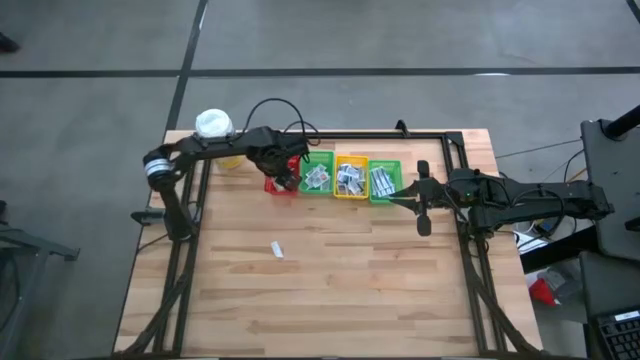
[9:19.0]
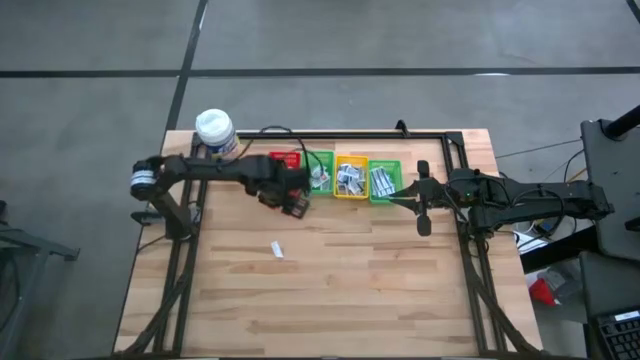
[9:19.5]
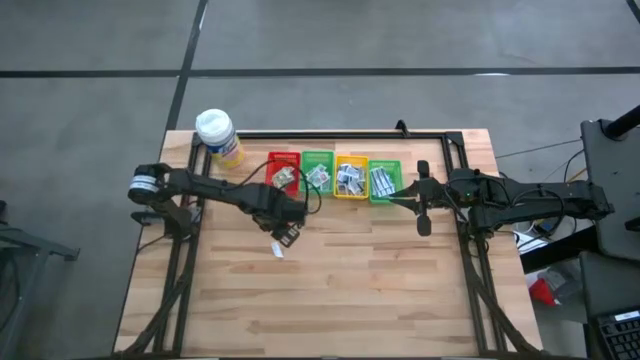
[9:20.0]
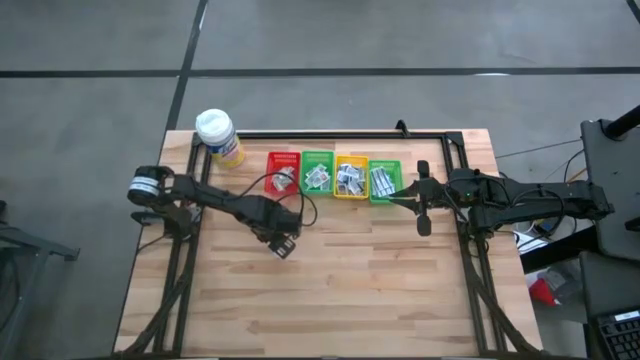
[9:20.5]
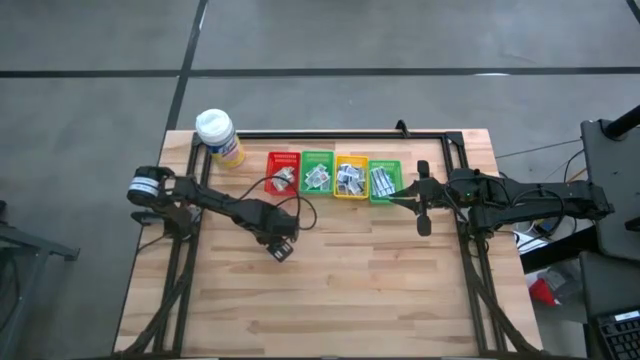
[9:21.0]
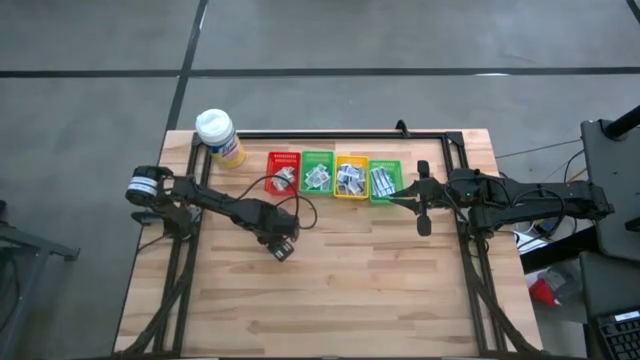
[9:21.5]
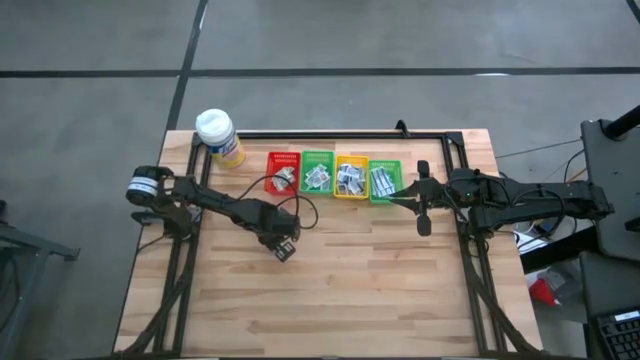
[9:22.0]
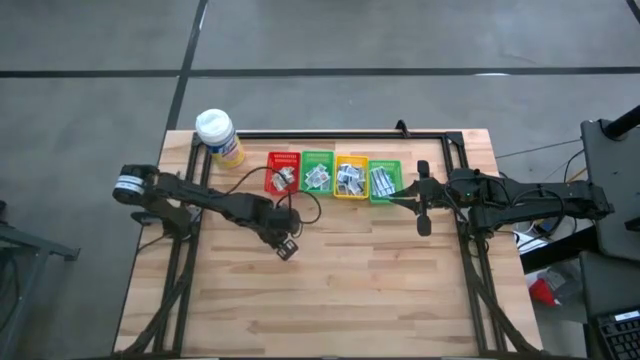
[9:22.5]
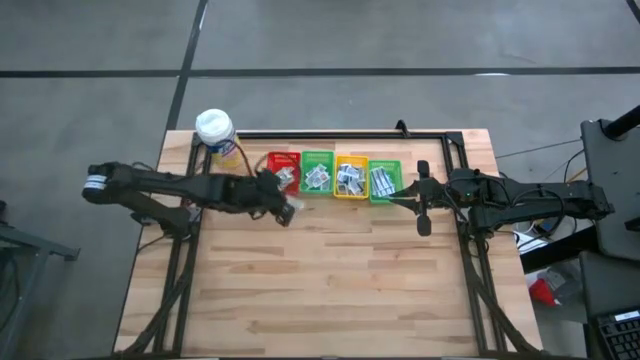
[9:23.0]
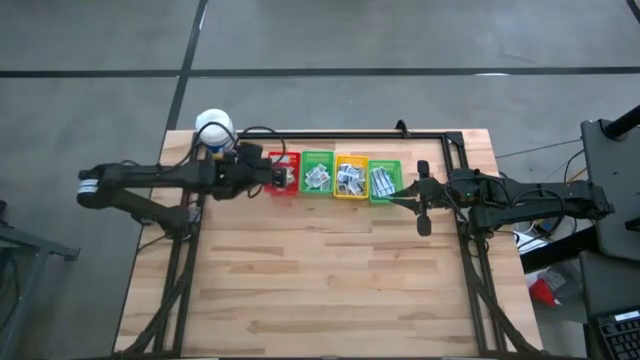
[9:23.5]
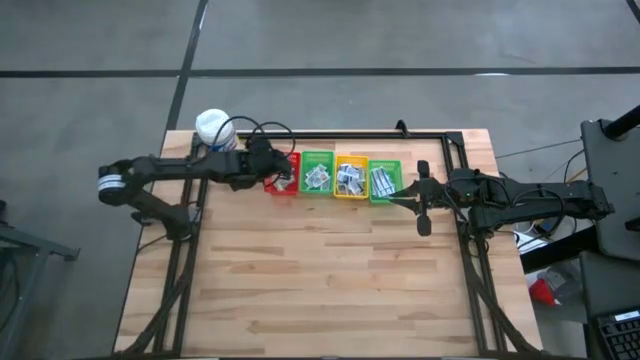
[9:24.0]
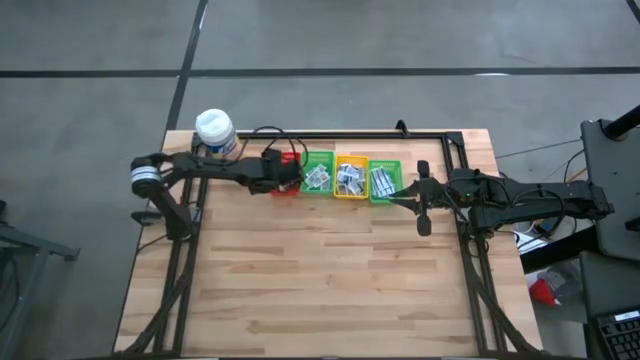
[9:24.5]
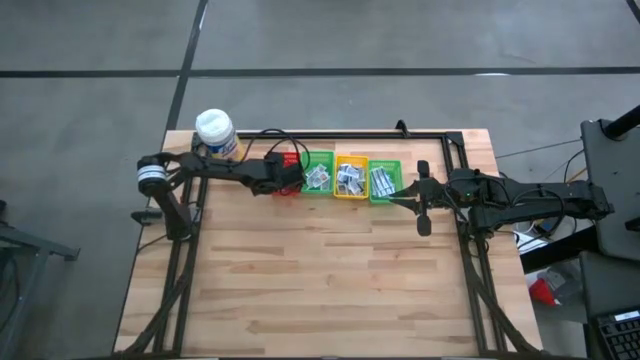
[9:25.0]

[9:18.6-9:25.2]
Task: Pick & Place First Aid Supplies
Put the green bandage into the red bin

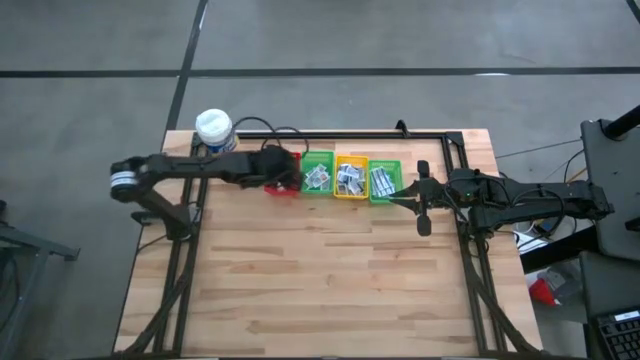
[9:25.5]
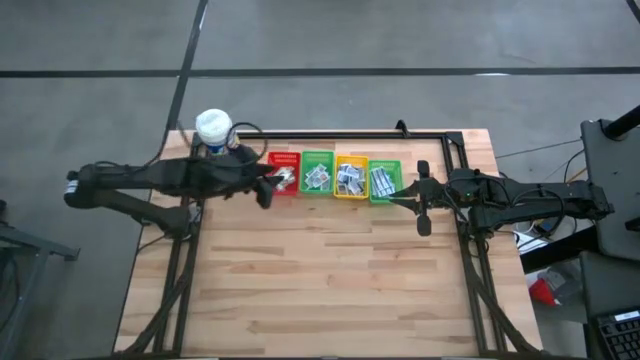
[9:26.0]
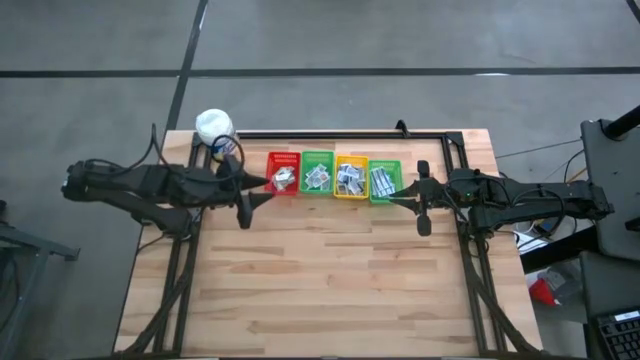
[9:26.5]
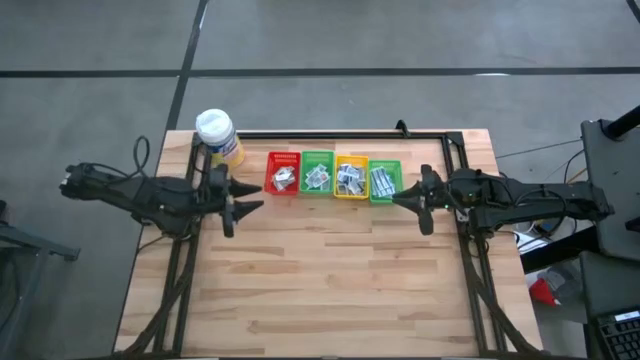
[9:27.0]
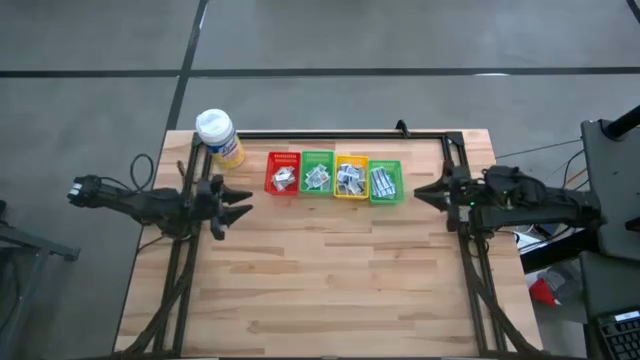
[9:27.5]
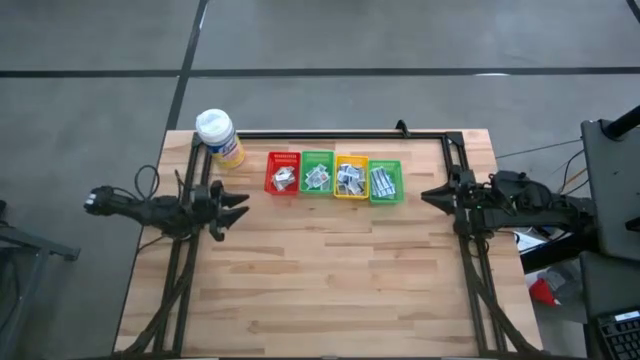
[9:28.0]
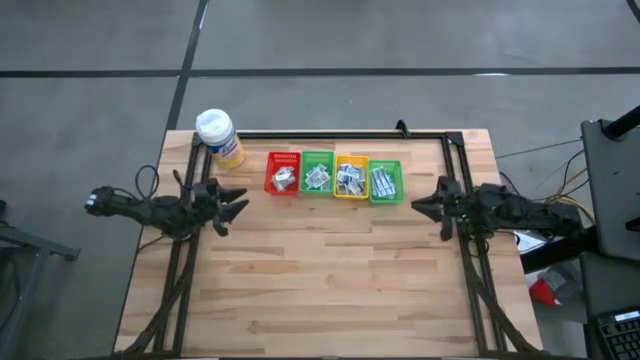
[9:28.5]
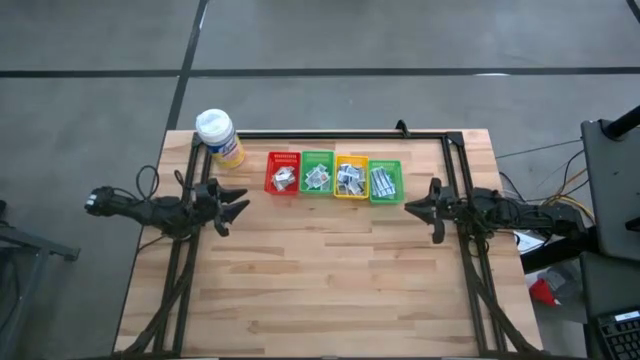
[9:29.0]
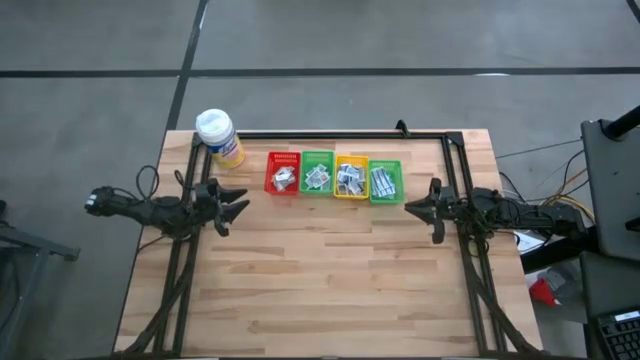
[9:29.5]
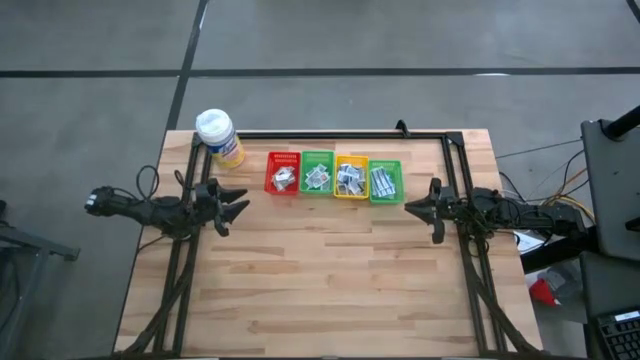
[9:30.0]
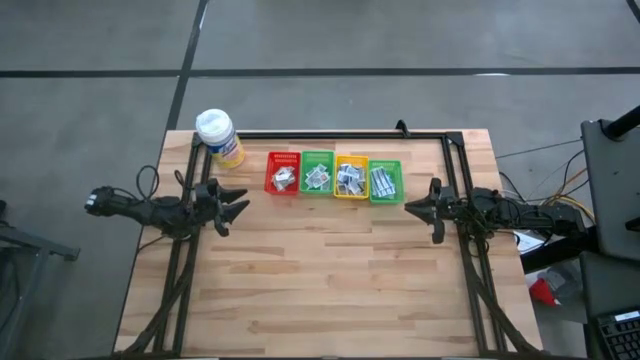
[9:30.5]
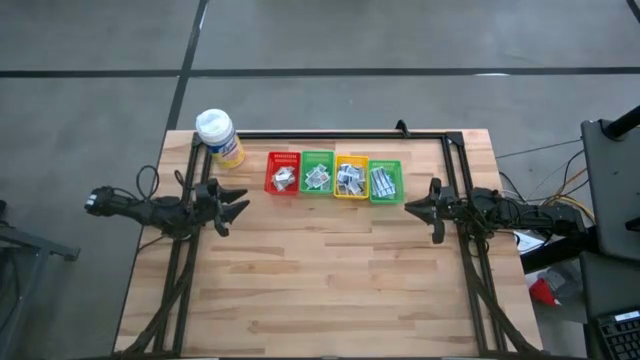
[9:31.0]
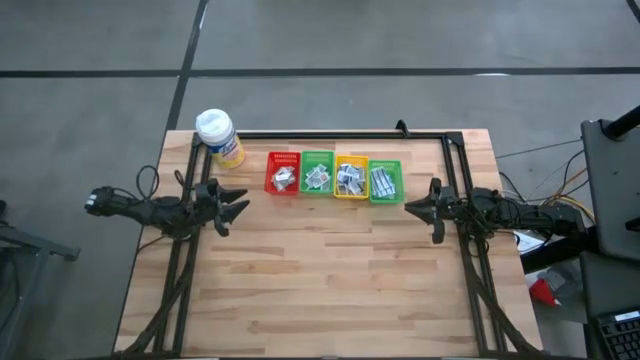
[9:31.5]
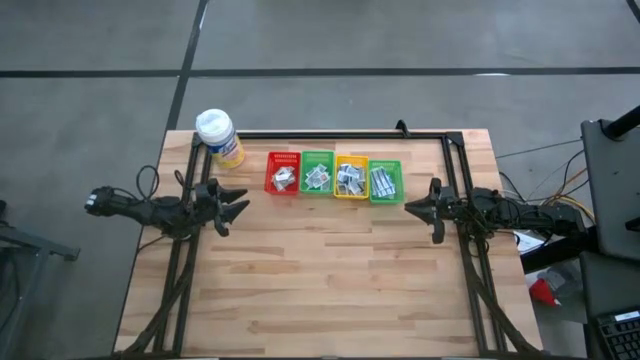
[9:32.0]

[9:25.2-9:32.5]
Return to Home Position

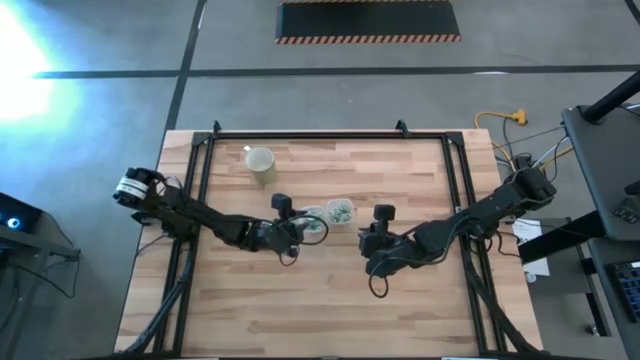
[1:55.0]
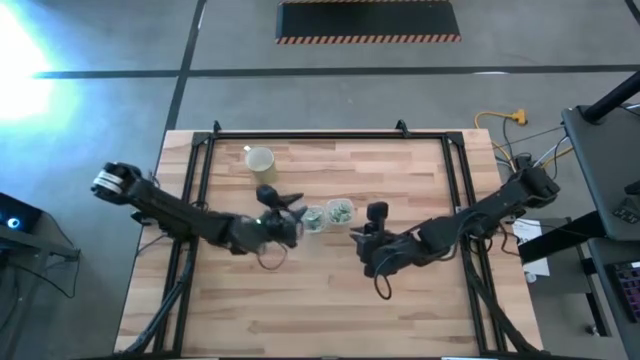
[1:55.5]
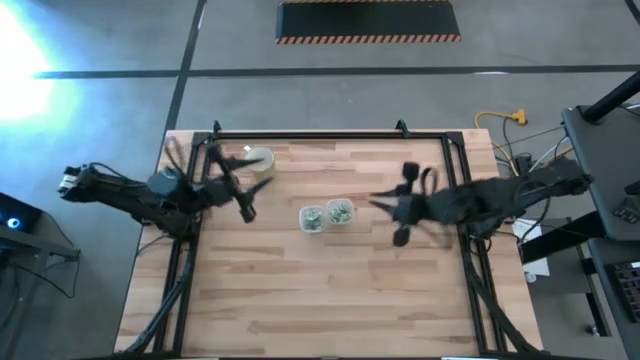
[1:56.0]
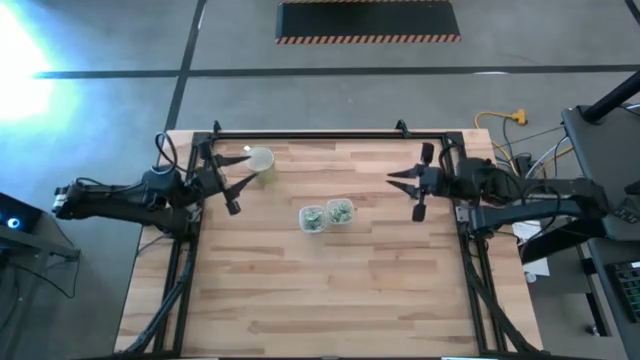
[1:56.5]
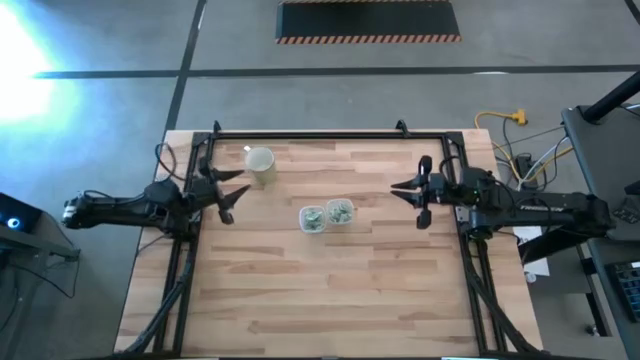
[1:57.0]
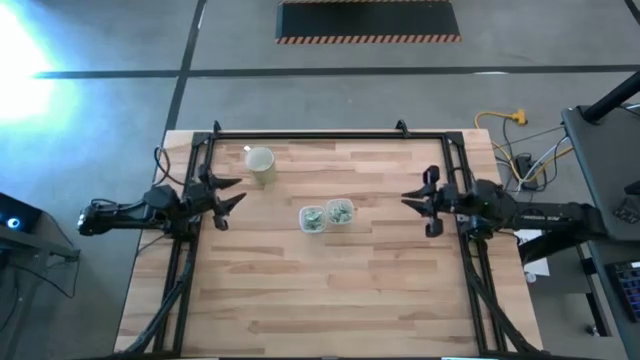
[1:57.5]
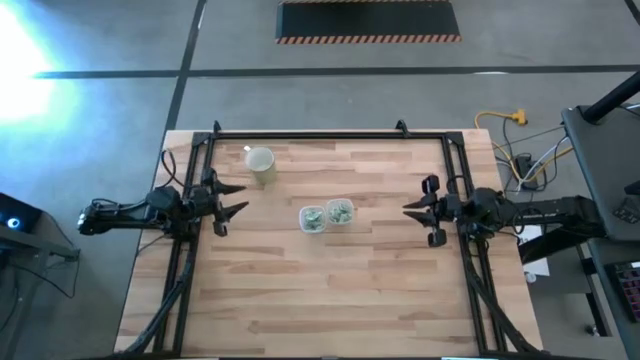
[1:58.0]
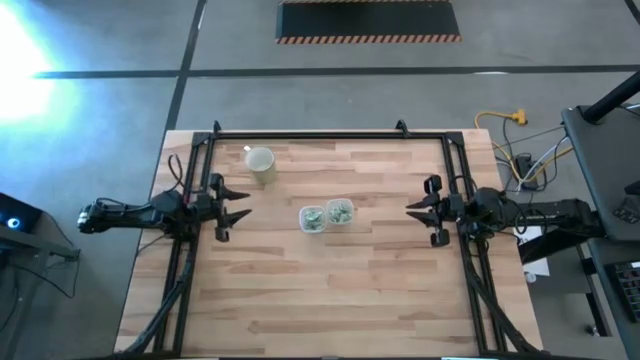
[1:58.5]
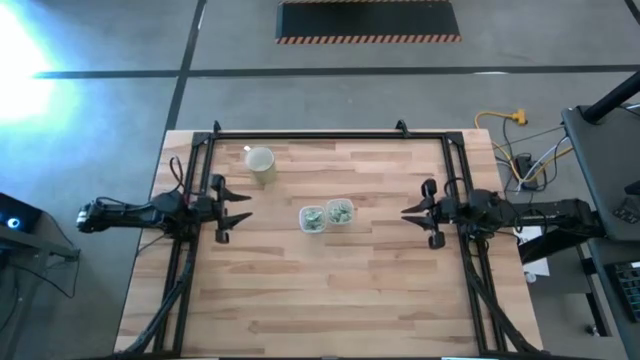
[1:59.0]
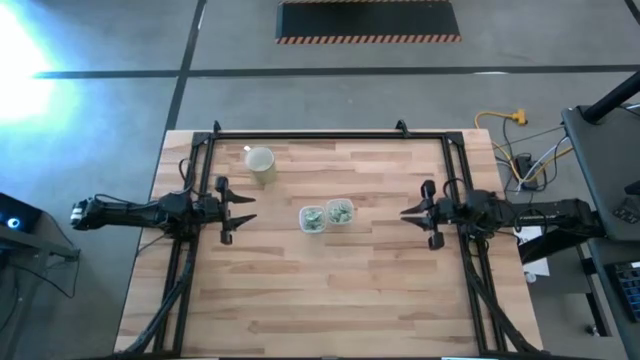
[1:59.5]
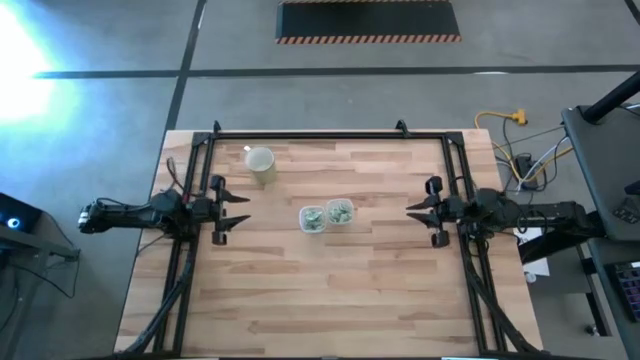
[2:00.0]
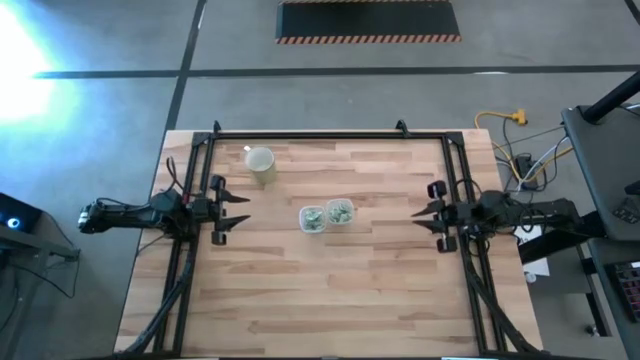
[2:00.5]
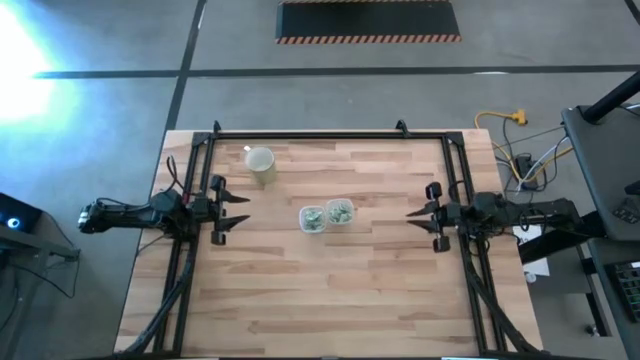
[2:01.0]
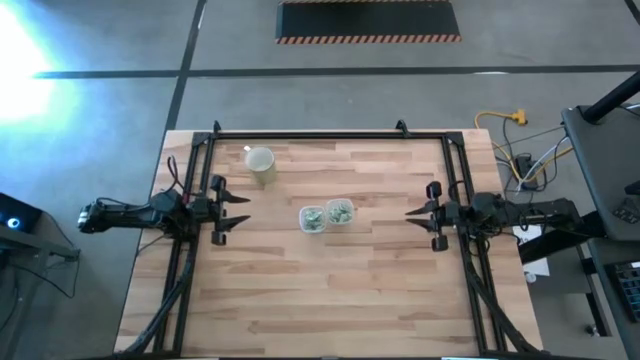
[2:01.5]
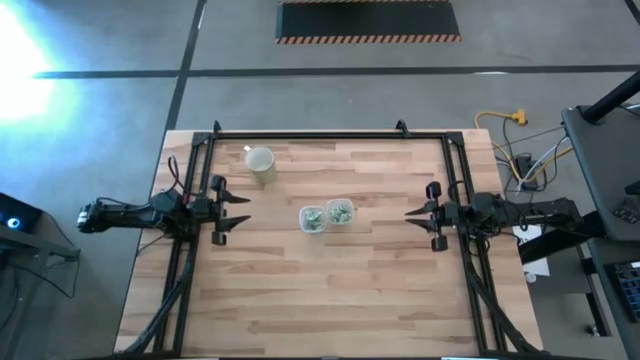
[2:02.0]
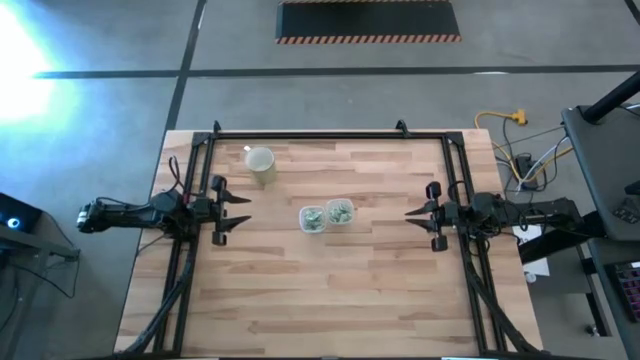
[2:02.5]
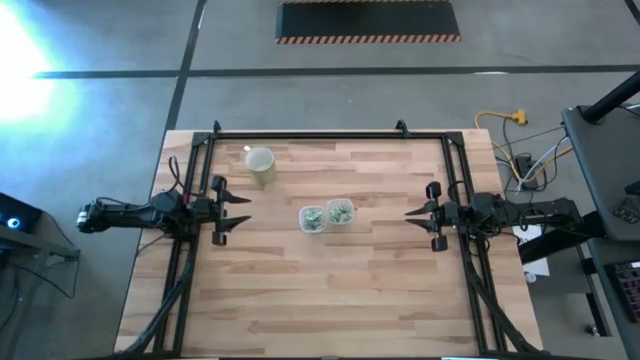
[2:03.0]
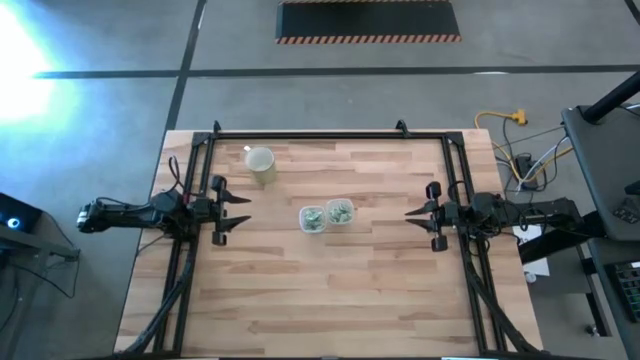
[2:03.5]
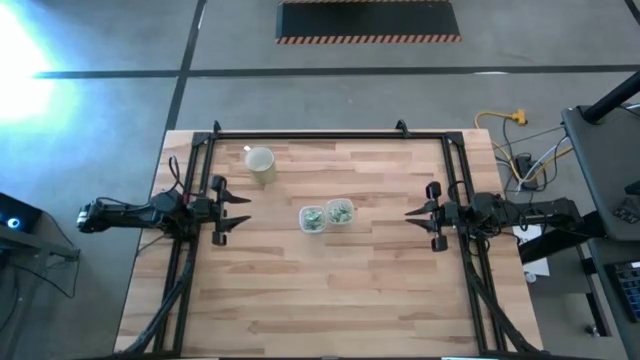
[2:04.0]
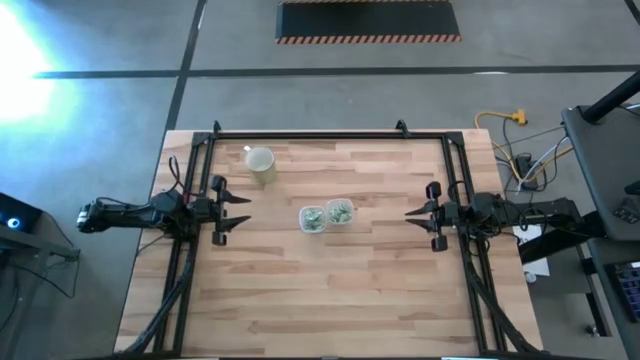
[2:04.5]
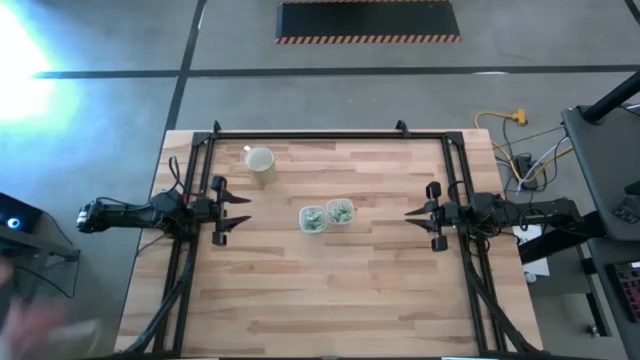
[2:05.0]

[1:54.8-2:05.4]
Task: Pick and place items into bin
Return to home position
